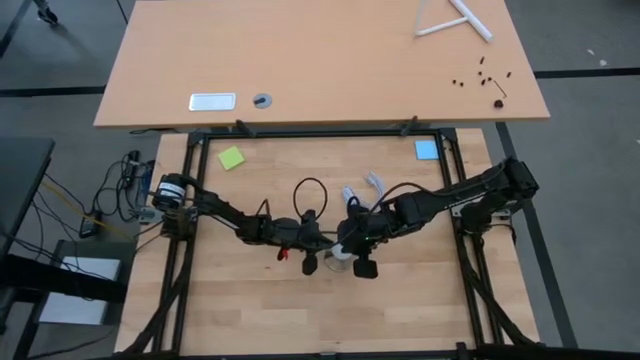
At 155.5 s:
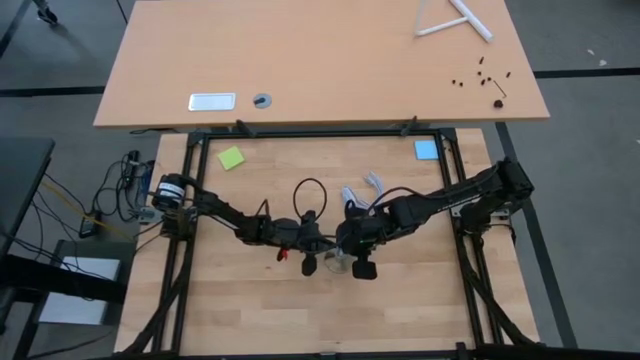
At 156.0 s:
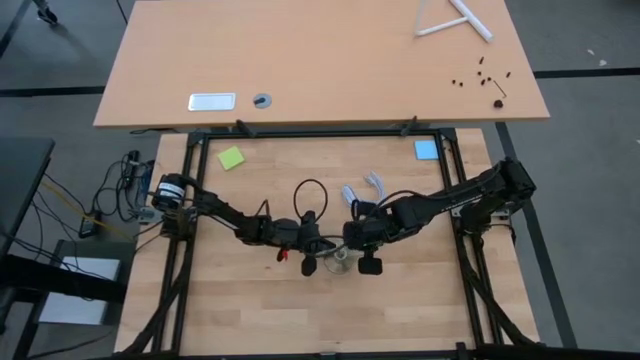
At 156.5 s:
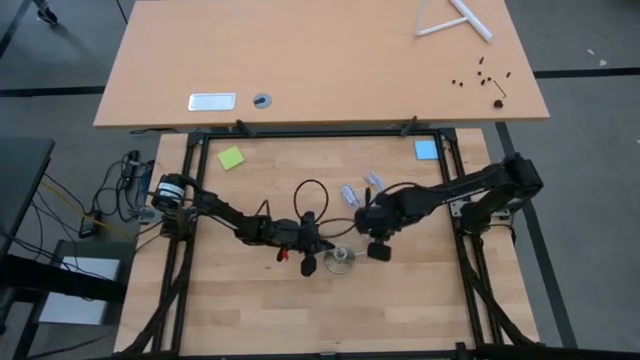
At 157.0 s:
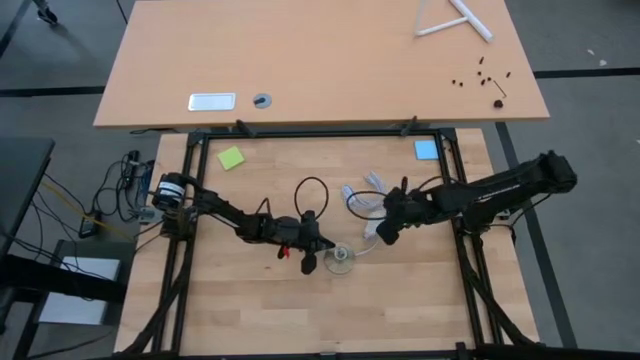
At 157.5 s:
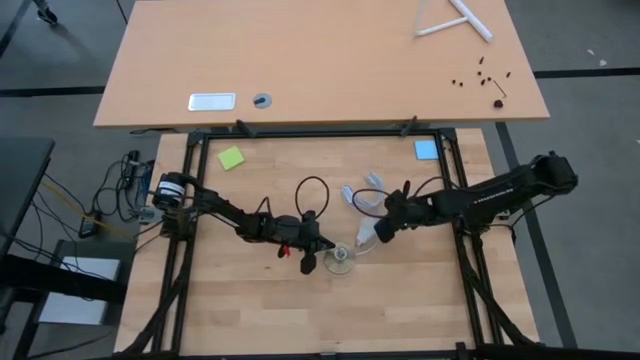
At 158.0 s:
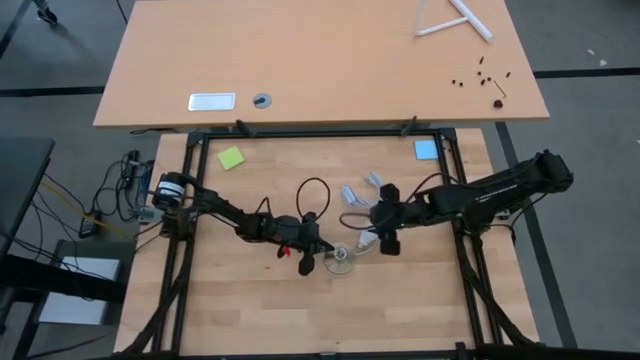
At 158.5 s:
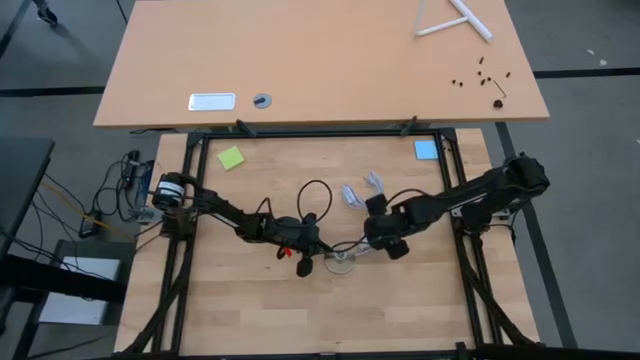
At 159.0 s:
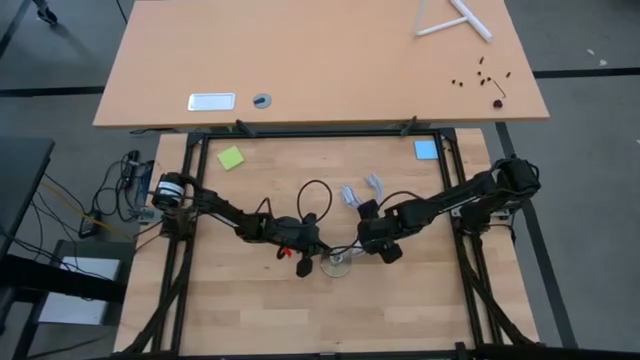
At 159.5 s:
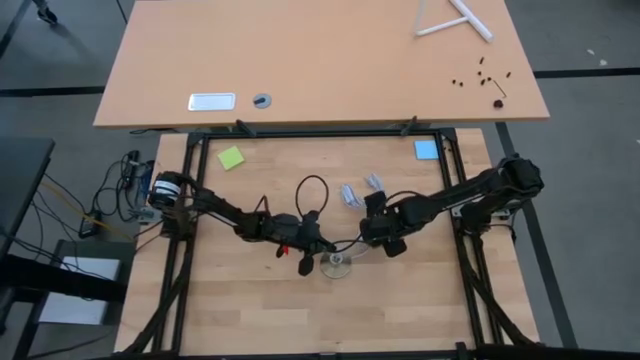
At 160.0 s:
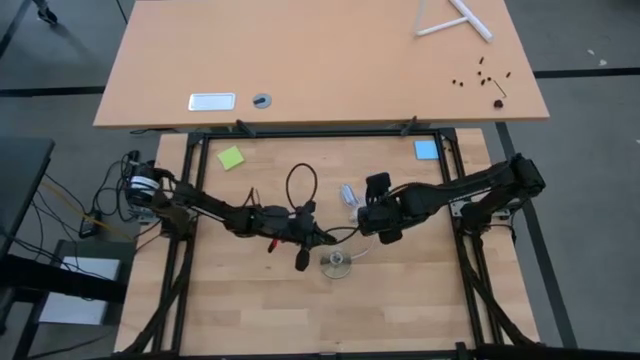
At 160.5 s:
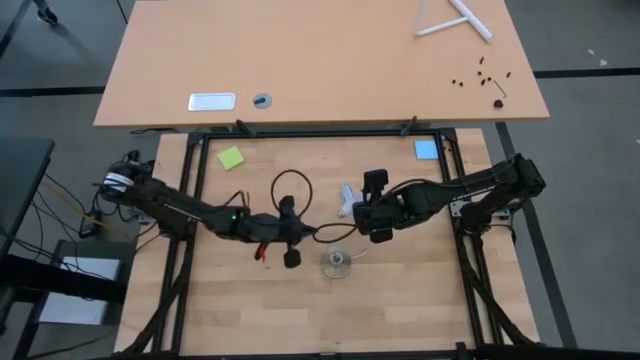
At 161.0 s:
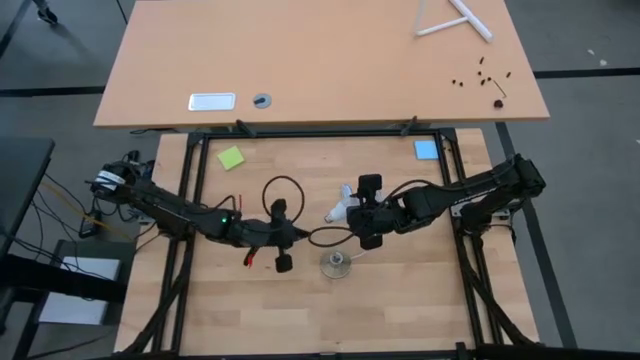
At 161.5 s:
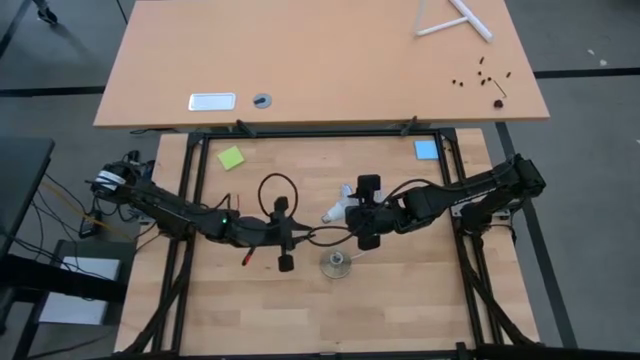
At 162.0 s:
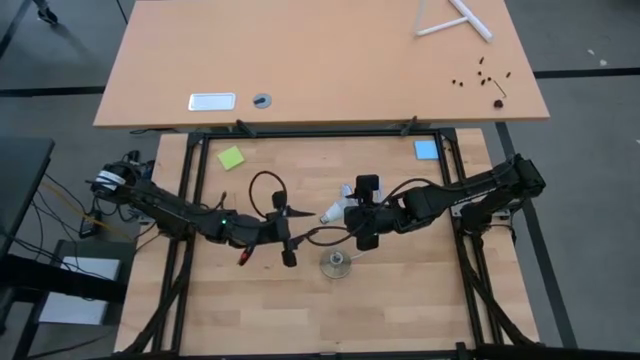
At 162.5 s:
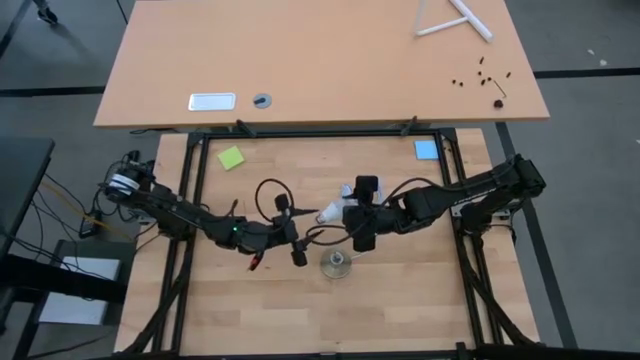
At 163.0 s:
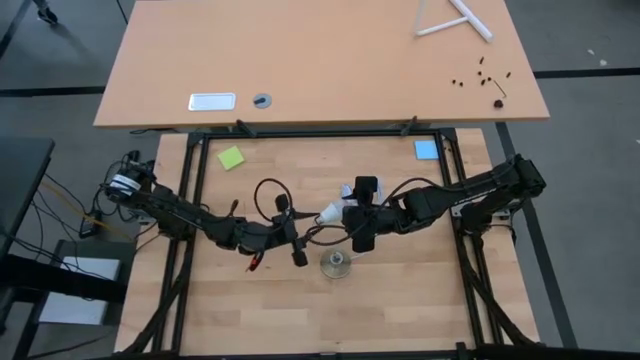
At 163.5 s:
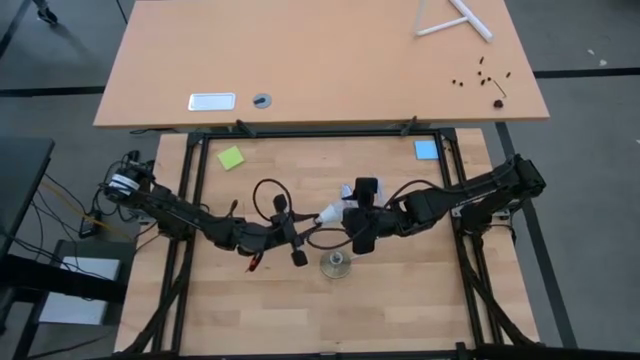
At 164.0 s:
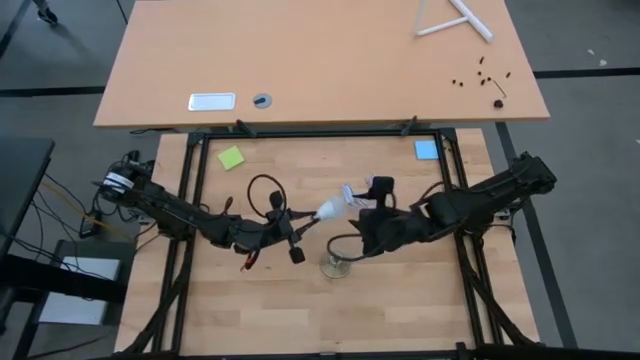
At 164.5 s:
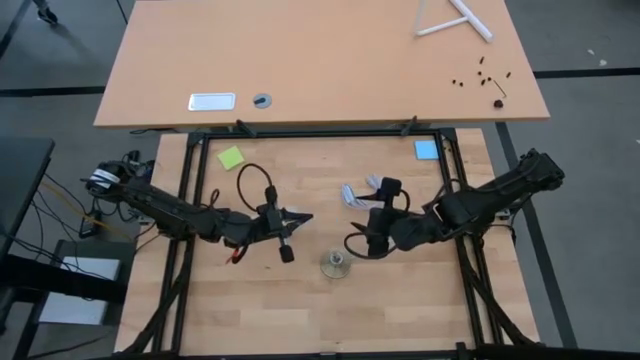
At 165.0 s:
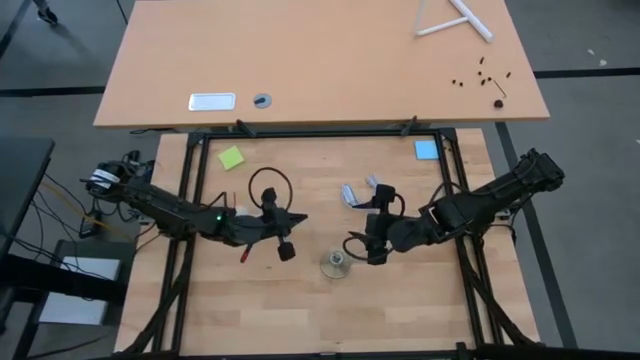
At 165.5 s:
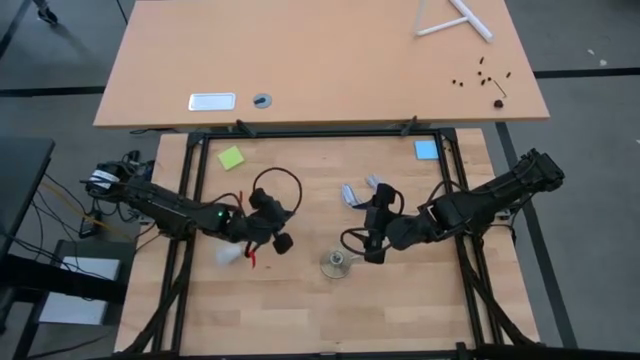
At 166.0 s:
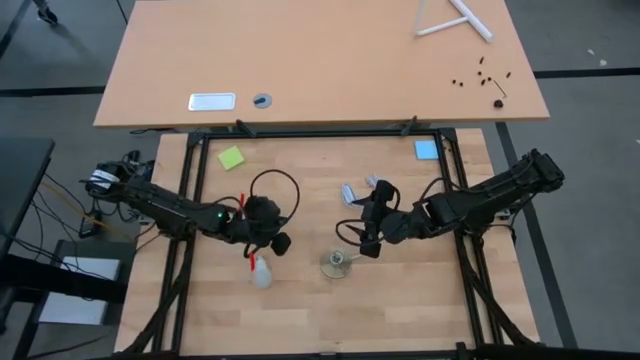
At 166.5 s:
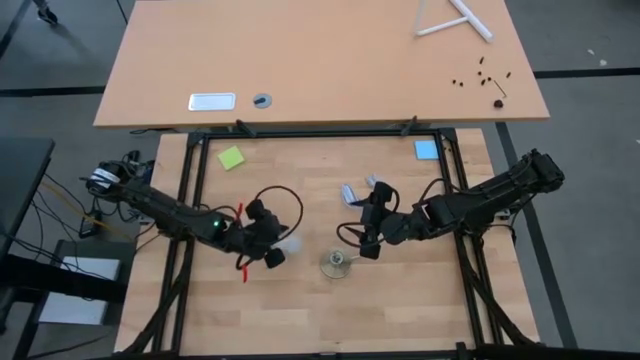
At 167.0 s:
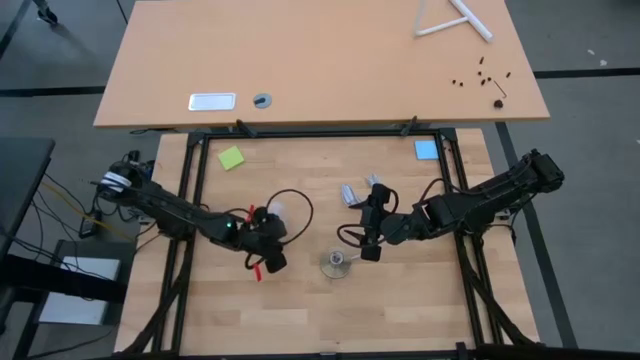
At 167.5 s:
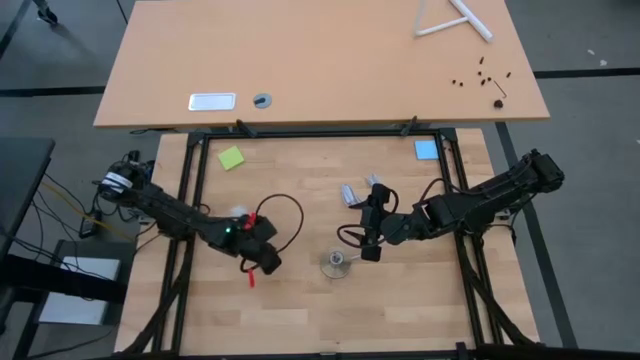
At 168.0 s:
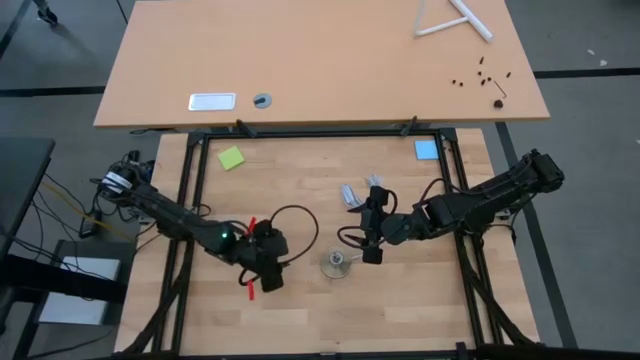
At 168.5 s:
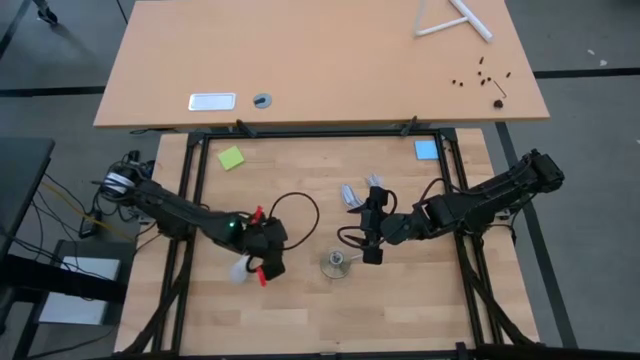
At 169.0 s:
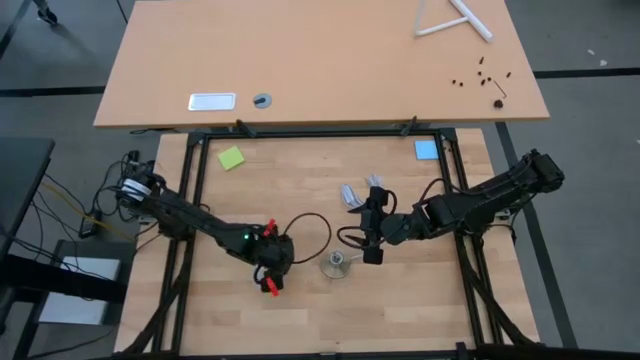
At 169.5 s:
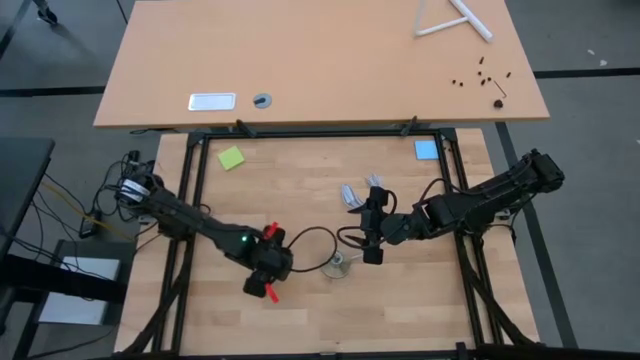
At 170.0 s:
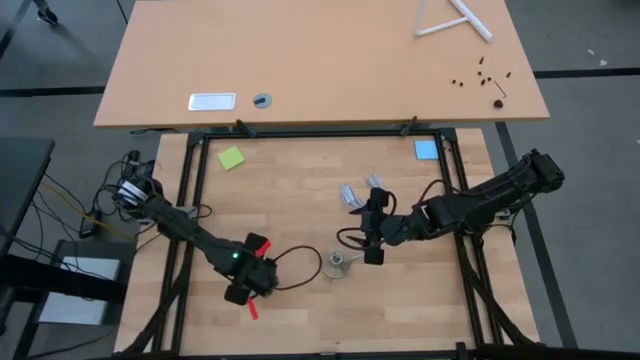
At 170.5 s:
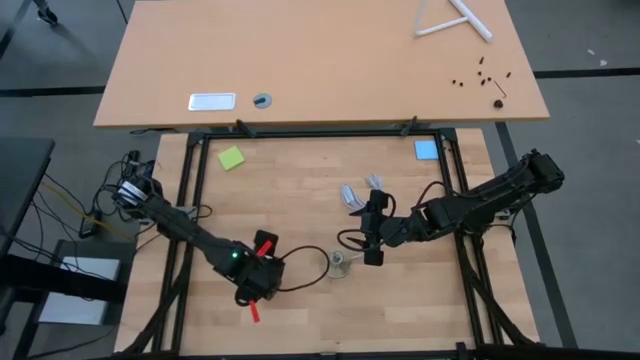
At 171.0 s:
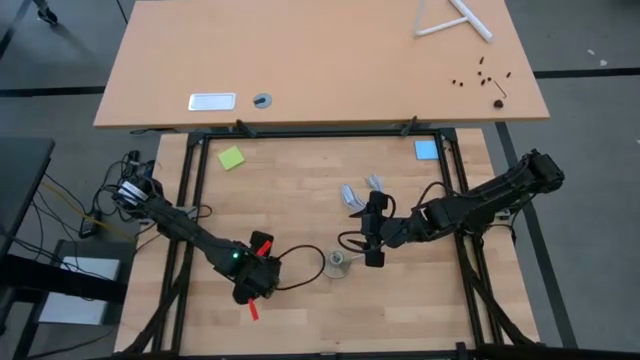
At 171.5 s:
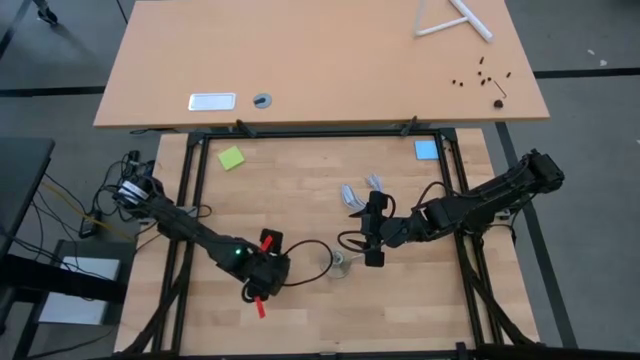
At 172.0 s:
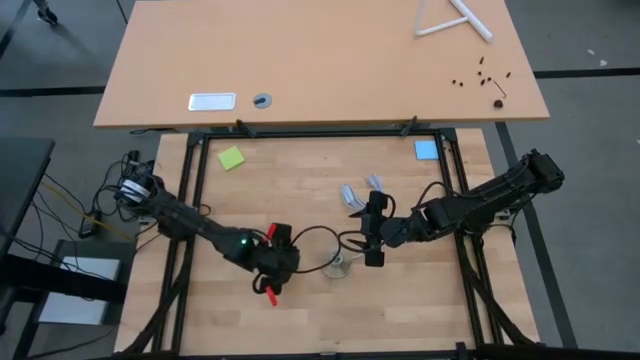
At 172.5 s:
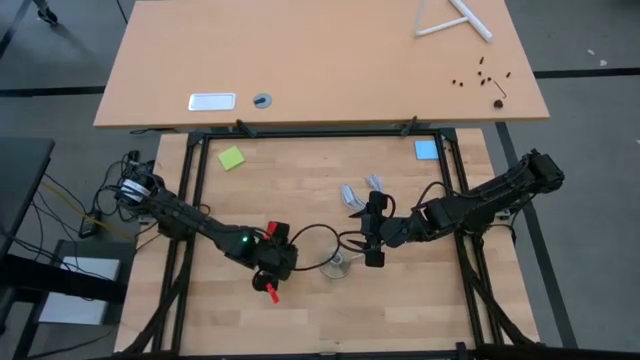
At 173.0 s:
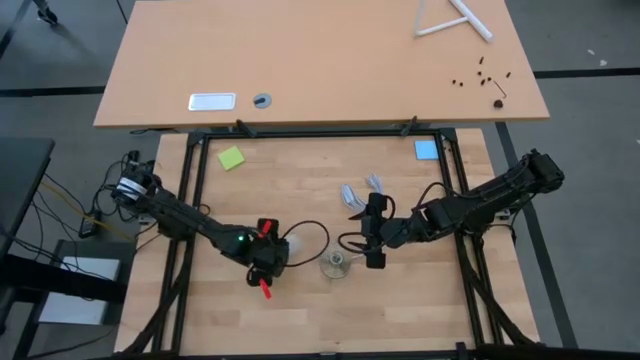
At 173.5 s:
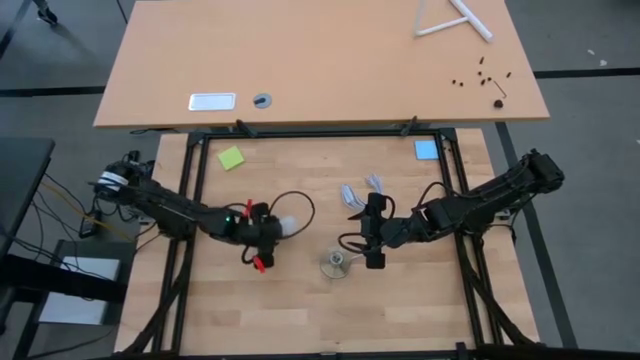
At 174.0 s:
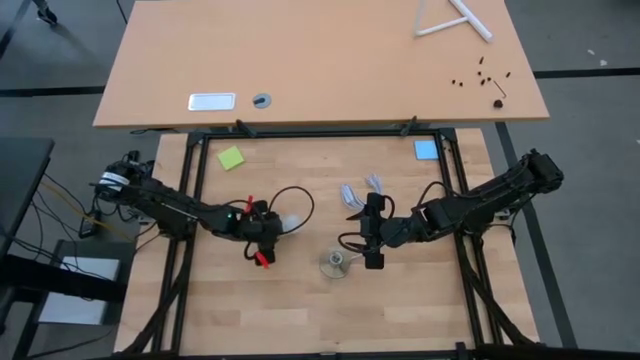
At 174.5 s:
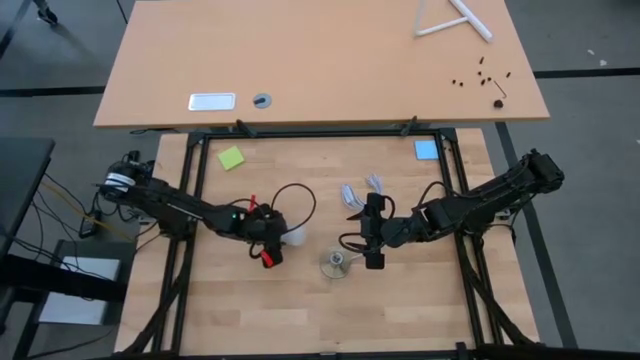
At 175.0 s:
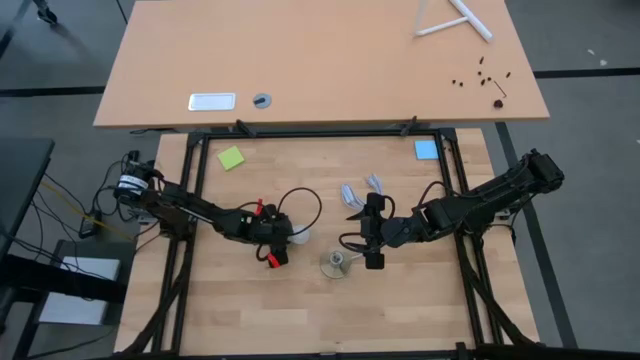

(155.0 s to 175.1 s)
Task: Screw lightbulb
Insert the lightbulb into the lamp
